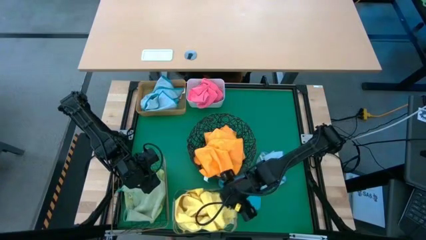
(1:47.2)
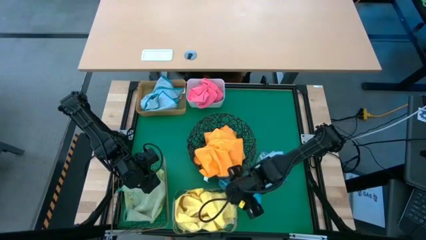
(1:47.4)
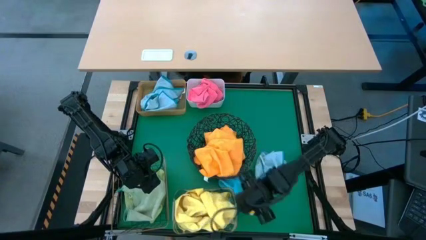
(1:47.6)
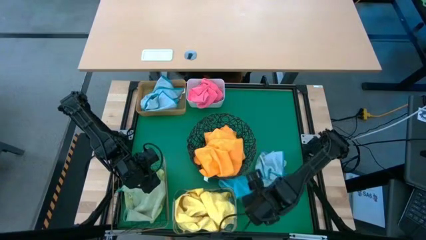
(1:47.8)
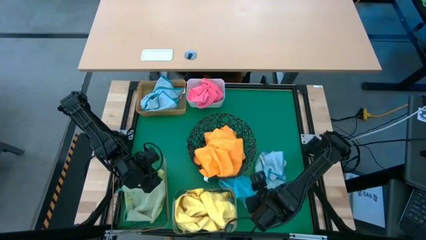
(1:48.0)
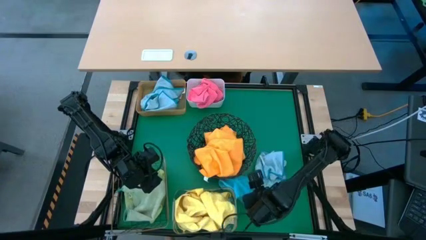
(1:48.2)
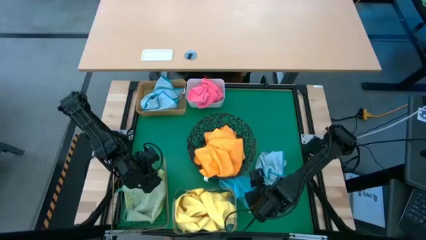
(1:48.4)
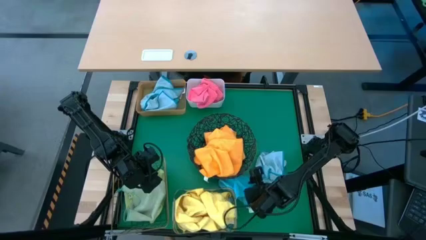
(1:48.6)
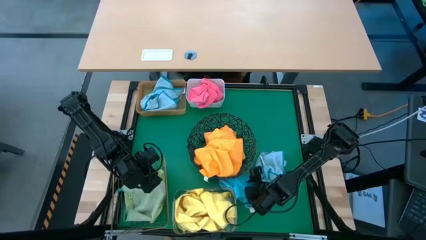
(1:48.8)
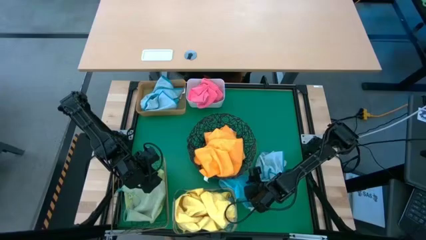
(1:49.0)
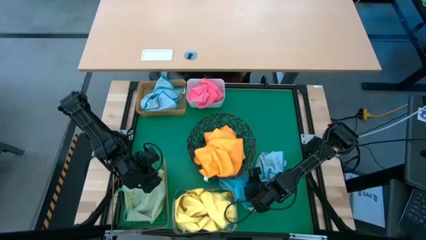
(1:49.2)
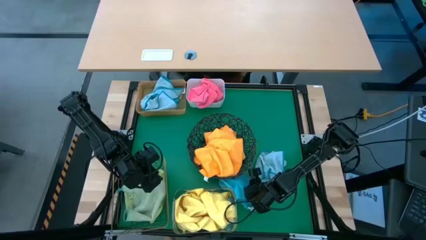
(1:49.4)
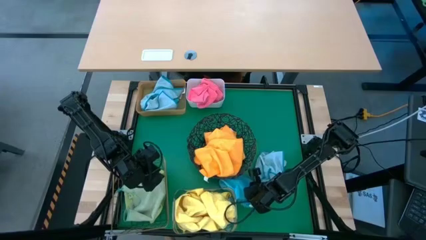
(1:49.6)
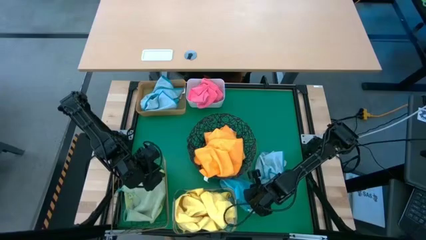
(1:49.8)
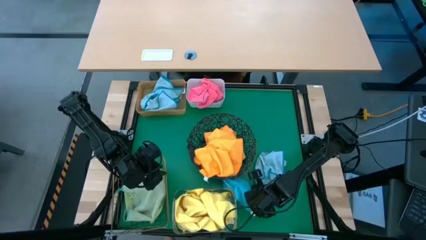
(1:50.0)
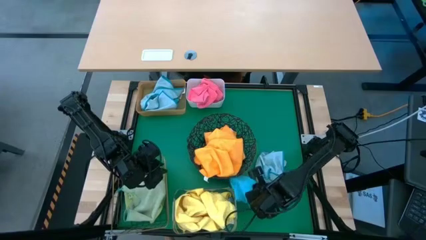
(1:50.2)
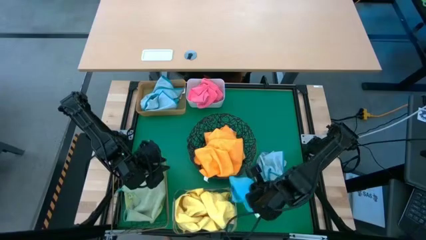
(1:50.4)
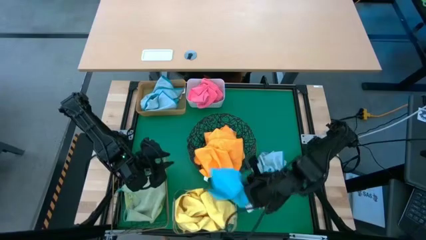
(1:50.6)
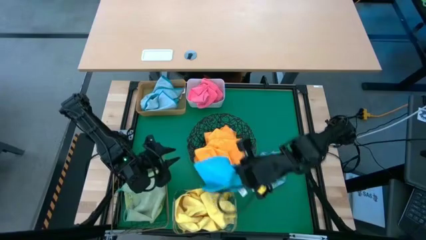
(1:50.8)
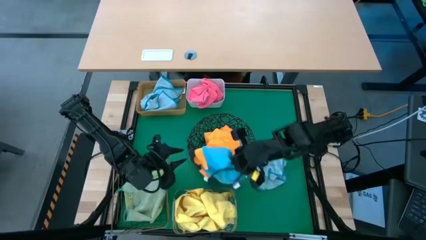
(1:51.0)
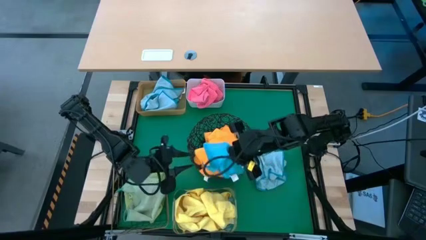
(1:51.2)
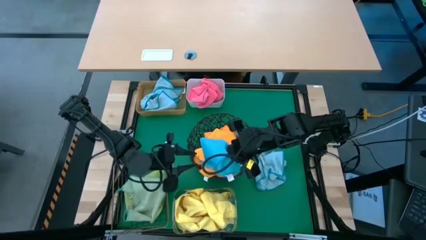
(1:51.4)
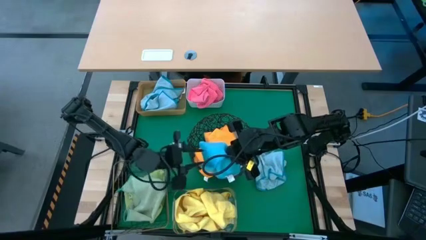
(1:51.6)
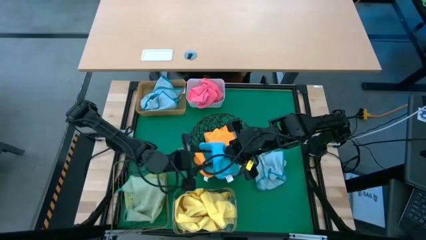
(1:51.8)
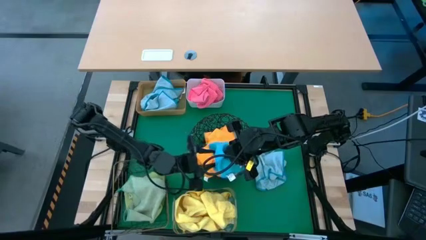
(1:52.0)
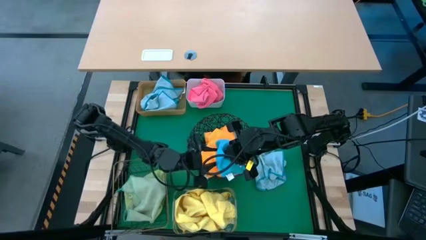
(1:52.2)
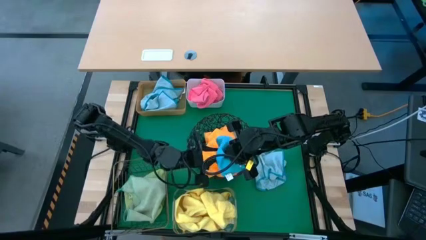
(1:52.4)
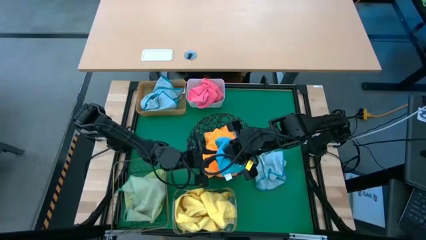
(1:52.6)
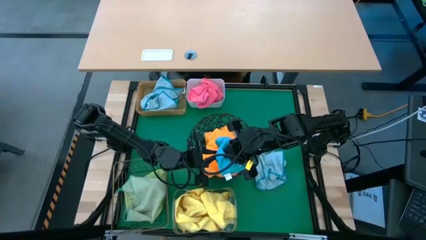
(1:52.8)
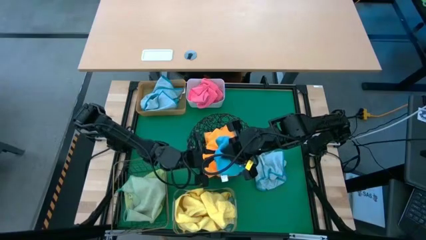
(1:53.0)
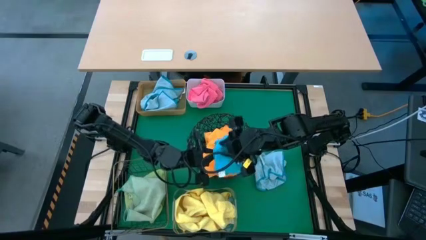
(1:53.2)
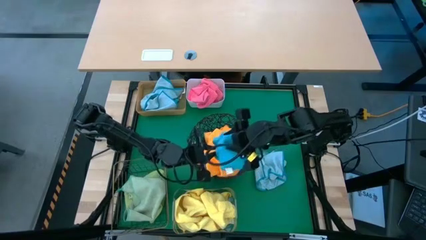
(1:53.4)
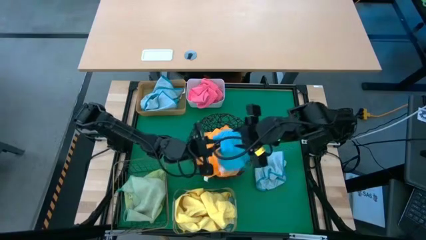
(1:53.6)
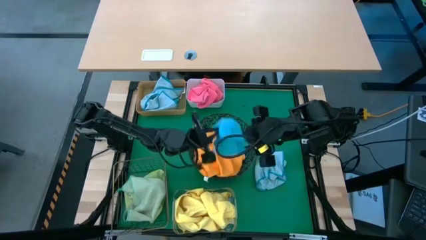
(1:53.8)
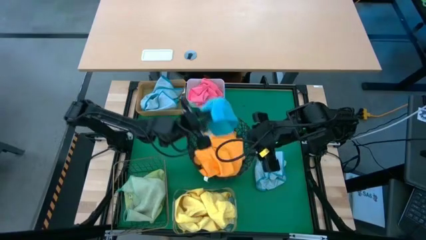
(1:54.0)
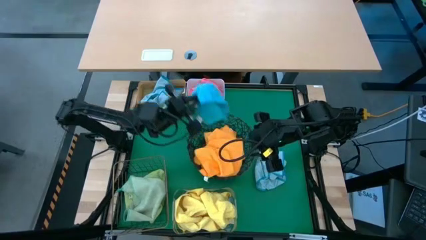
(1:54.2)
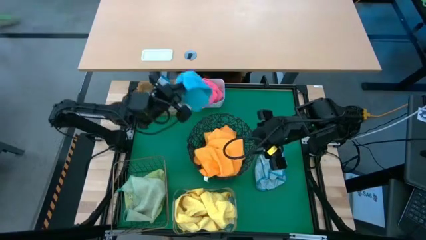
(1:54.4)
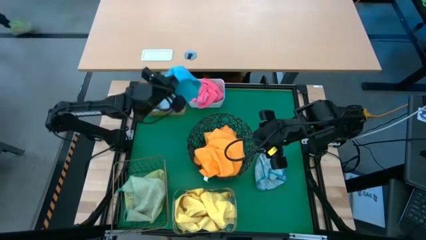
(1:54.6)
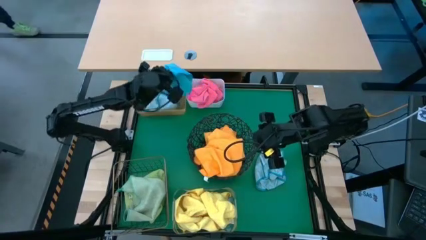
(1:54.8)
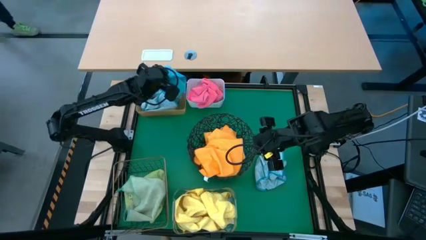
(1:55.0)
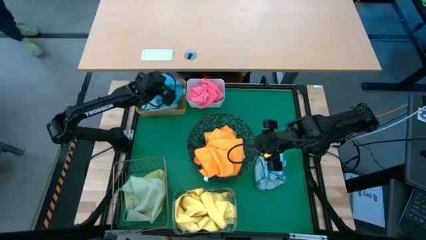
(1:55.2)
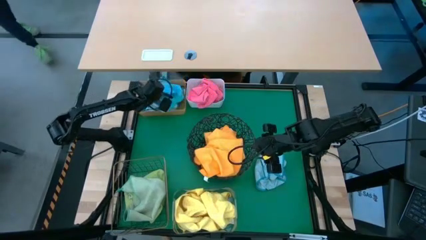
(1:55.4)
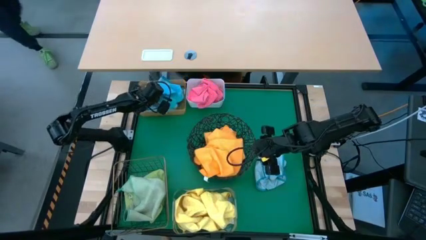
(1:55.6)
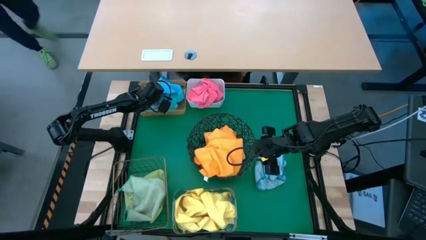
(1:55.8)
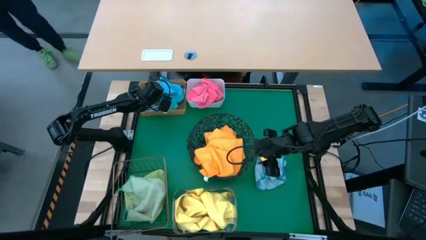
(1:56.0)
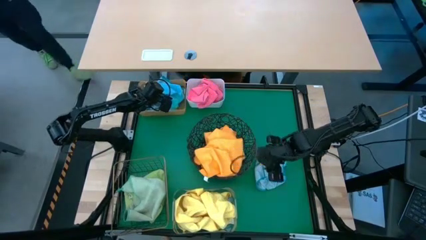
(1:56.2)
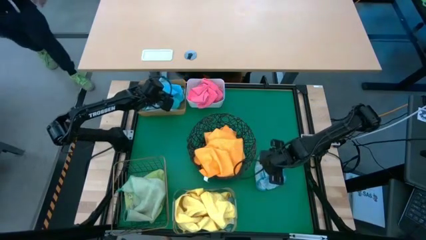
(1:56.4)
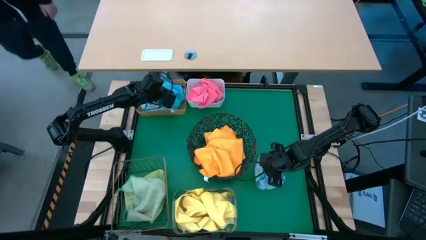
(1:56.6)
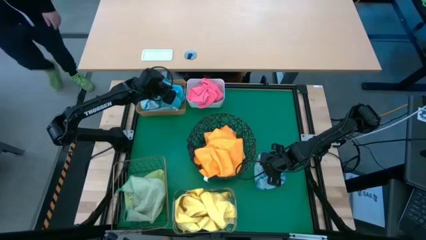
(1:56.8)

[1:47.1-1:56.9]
Task: Sort microfiber towel by color & place in baskets
Put the blue towel into the orange bin

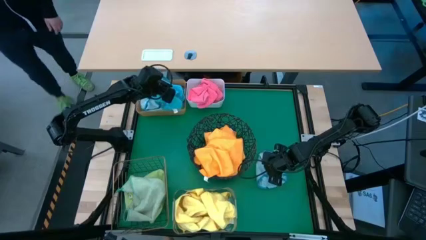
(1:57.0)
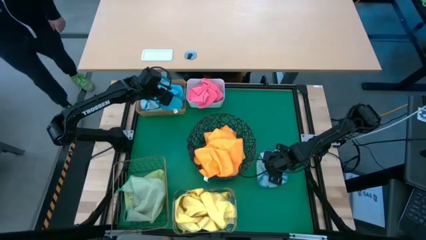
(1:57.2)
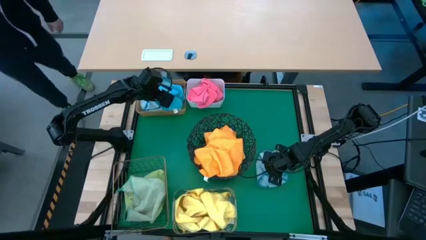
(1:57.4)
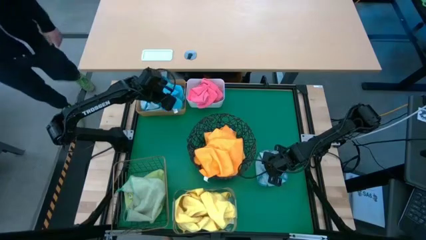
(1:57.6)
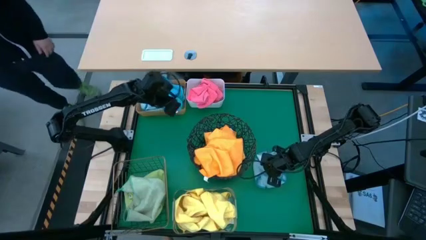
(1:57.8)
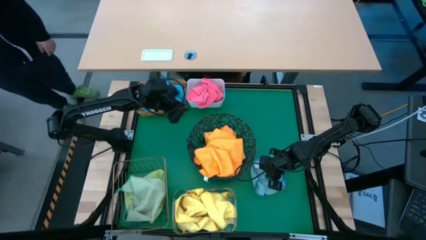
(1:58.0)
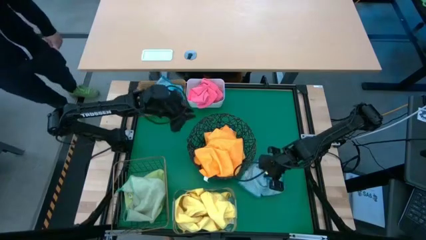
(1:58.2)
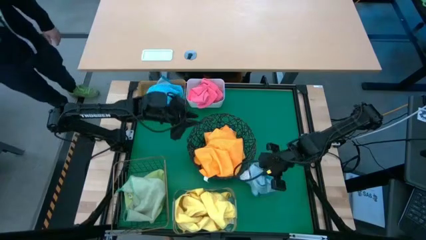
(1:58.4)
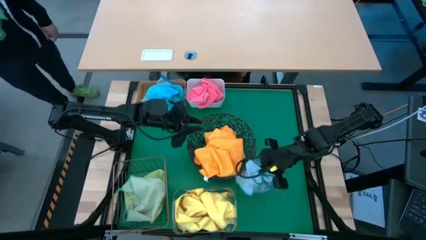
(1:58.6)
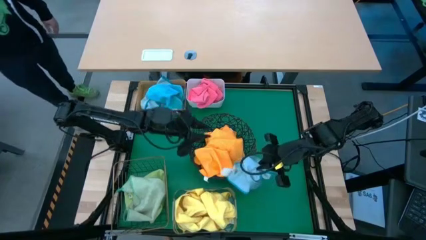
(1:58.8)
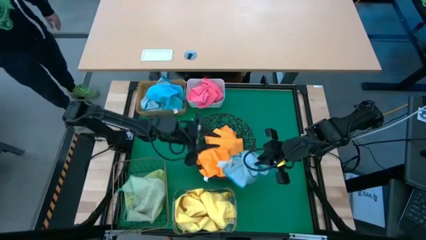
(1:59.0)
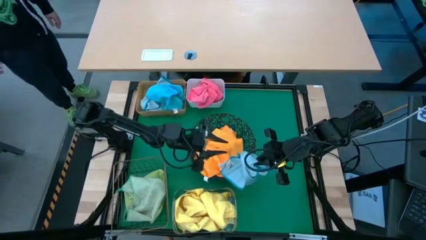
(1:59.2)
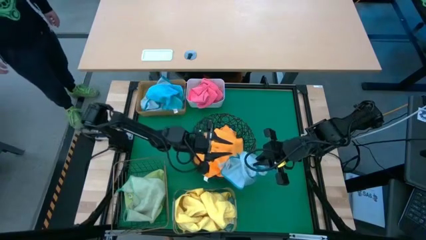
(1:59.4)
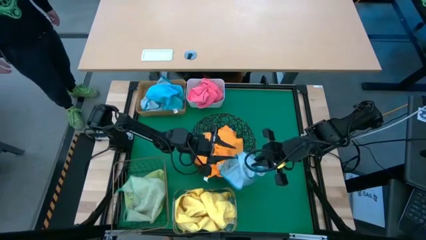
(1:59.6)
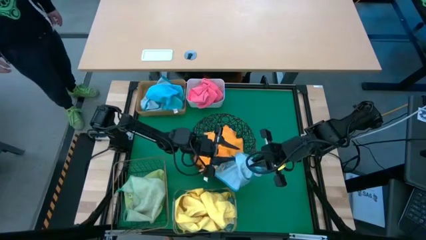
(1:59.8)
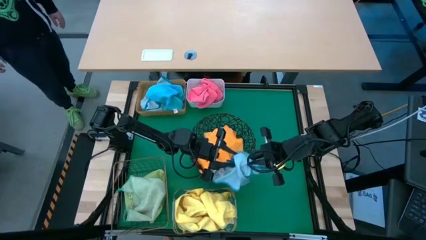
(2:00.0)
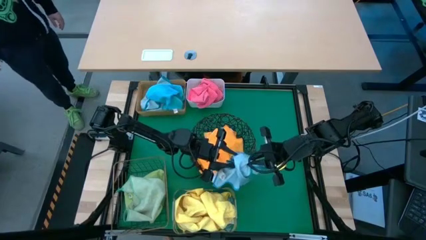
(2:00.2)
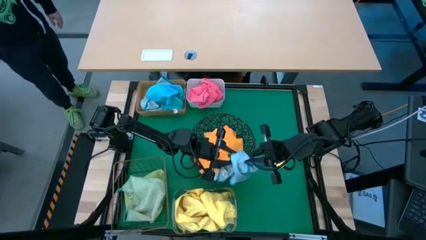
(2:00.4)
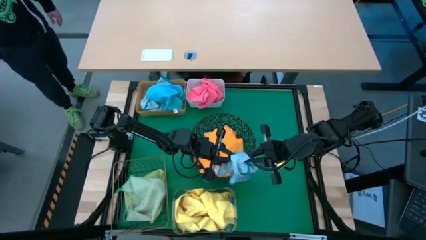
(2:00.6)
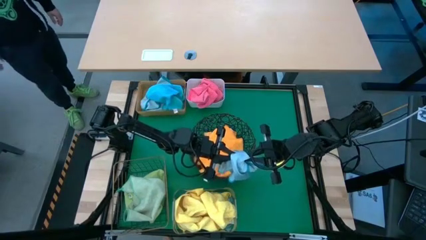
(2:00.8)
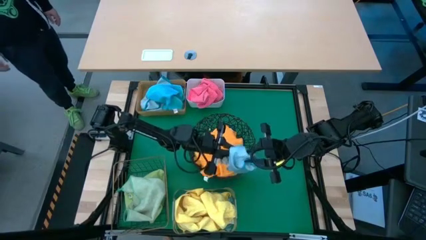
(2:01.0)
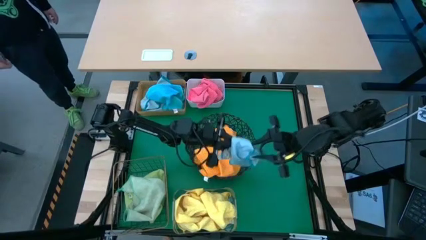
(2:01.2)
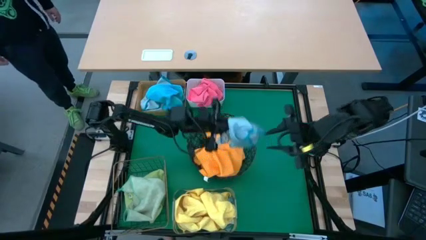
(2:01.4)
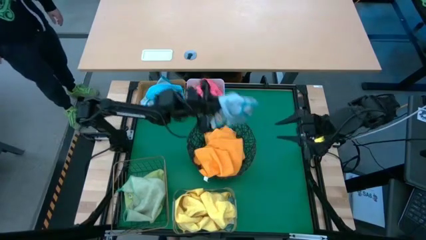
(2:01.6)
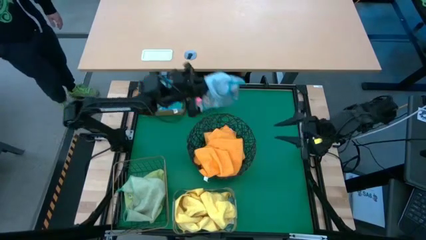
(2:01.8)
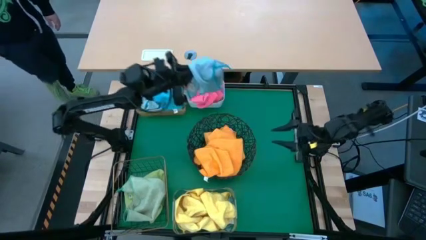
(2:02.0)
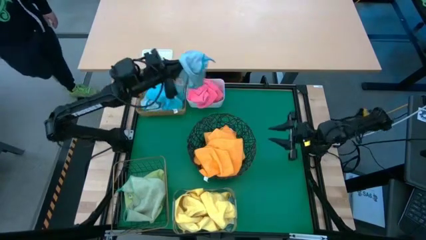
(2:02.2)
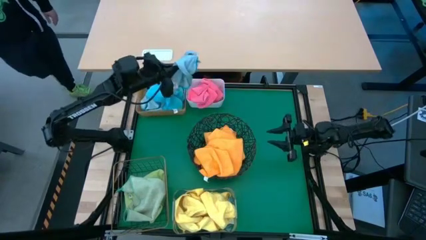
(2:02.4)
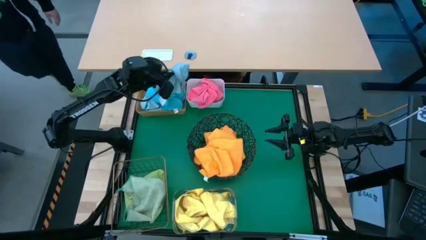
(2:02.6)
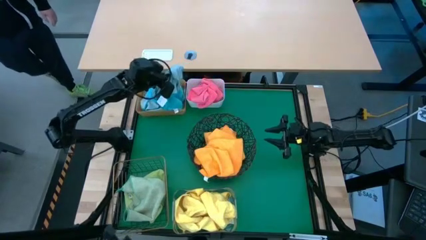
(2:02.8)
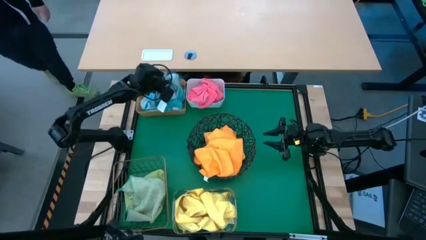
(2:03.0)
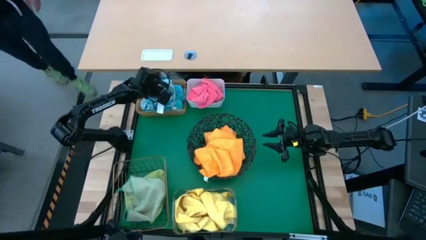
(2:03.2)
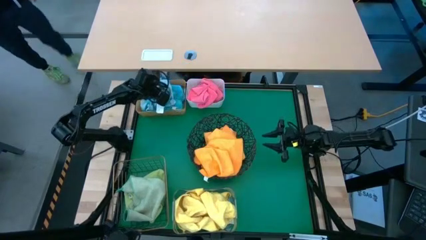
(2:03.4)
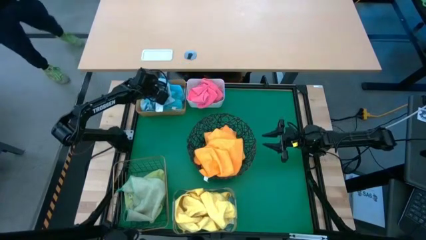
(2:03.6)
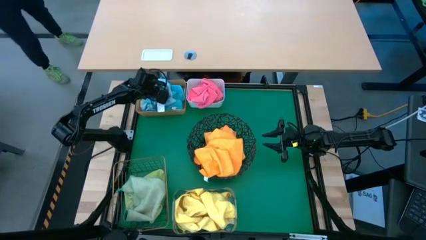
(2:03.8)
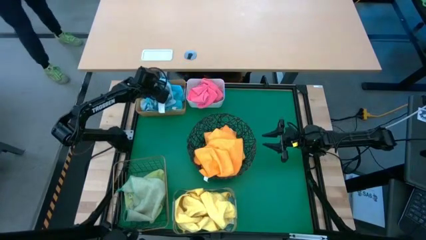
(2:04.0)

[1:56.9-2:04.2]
Put the blue towel into the orange bin

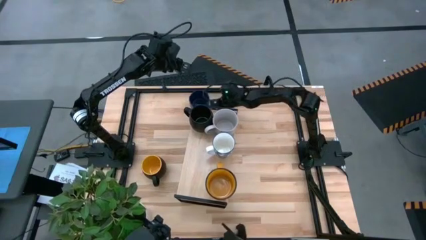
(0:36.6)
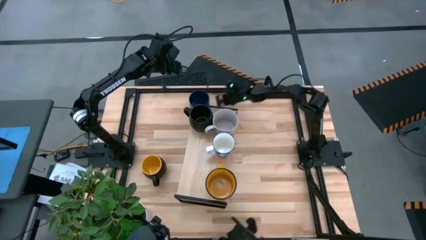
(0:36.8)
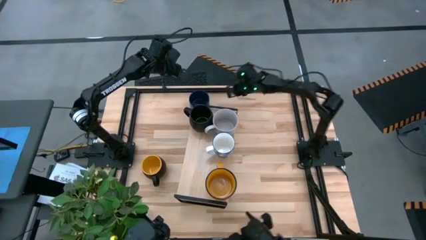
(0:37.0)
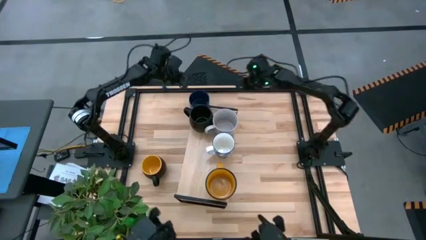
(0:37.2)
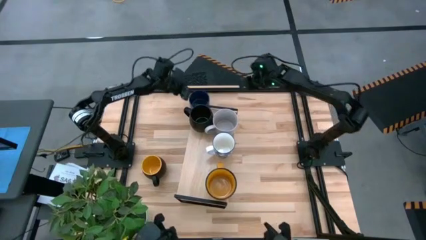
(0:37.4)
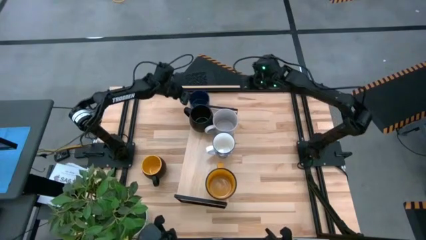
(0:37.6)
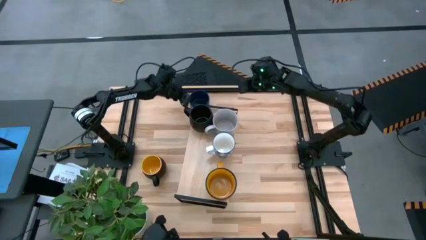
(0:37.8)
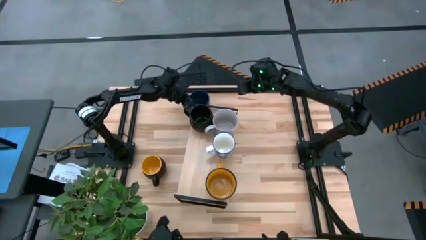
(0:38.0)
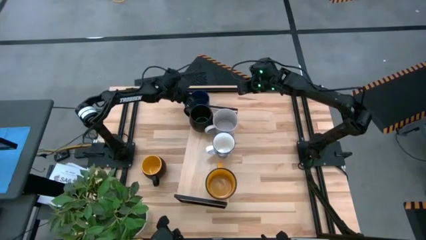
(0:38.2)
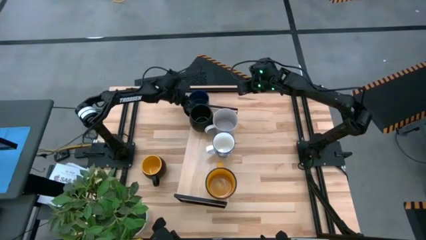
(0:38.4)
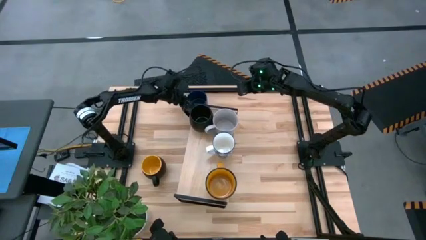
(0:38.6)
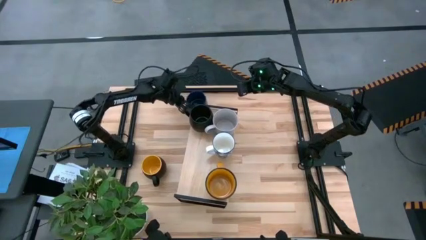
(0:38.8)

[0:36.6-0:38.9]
Task: Place coffee mugs
Put the blue mug on the shelf
